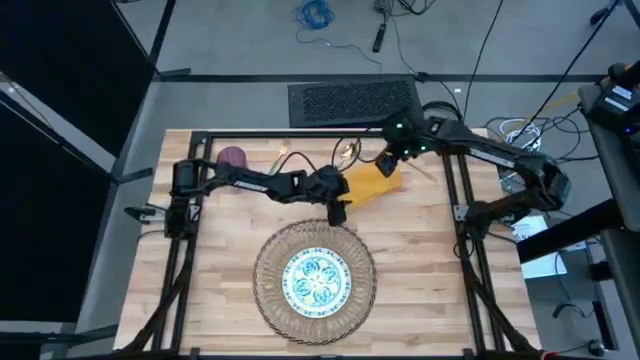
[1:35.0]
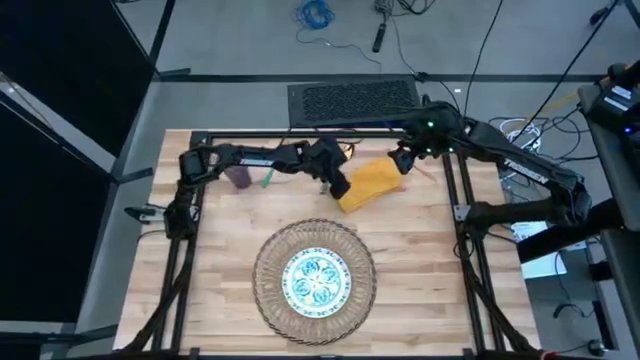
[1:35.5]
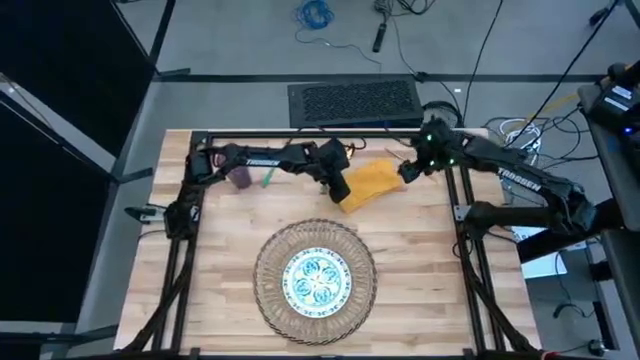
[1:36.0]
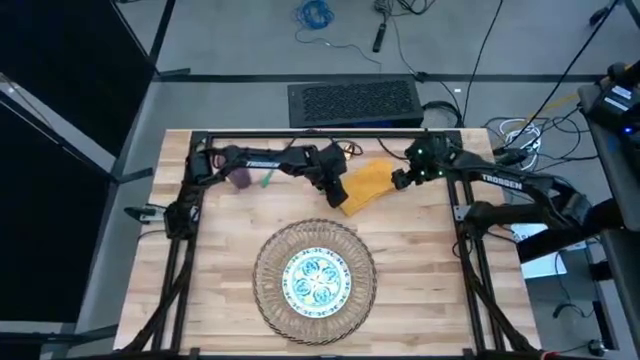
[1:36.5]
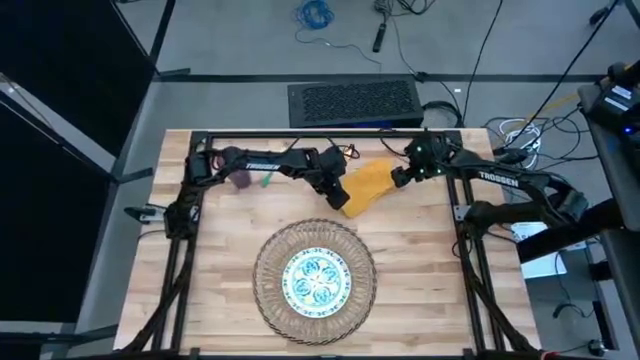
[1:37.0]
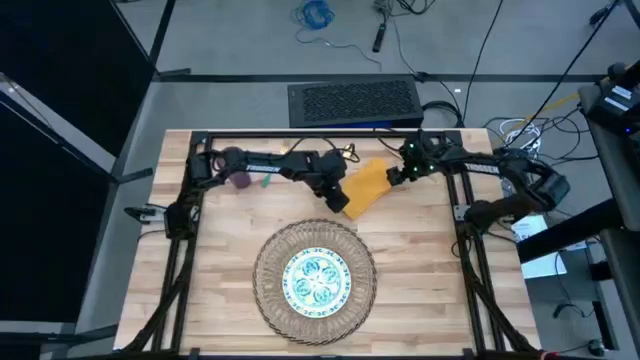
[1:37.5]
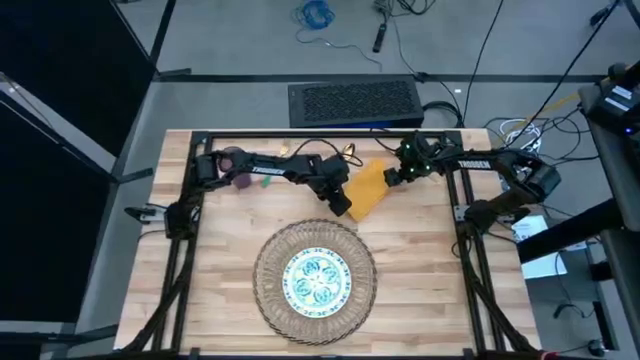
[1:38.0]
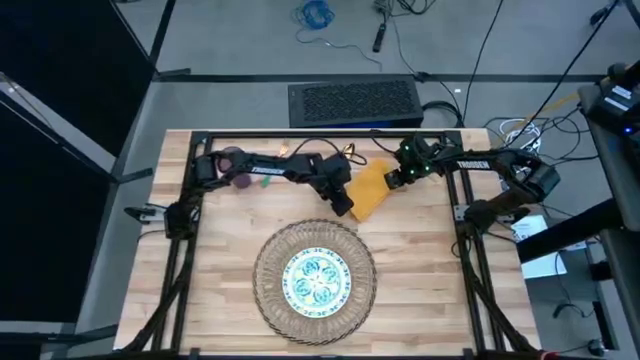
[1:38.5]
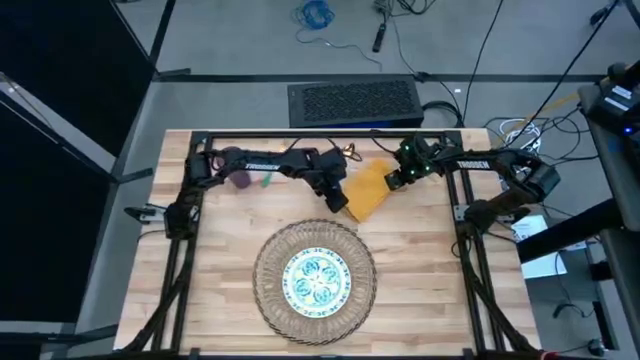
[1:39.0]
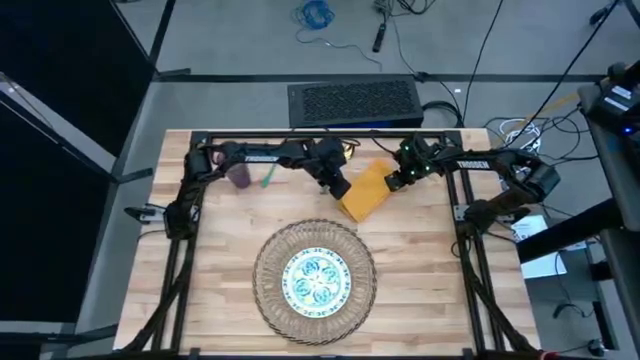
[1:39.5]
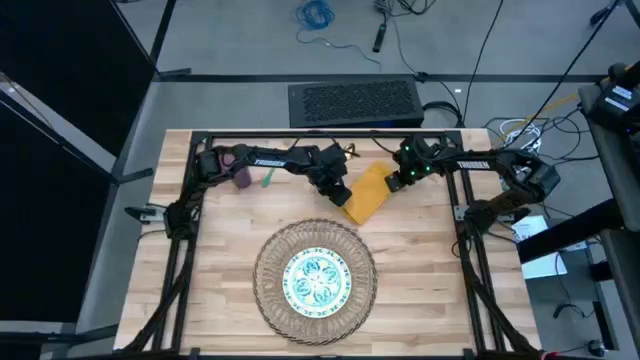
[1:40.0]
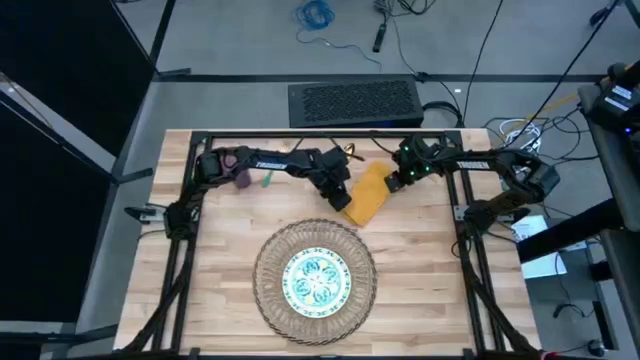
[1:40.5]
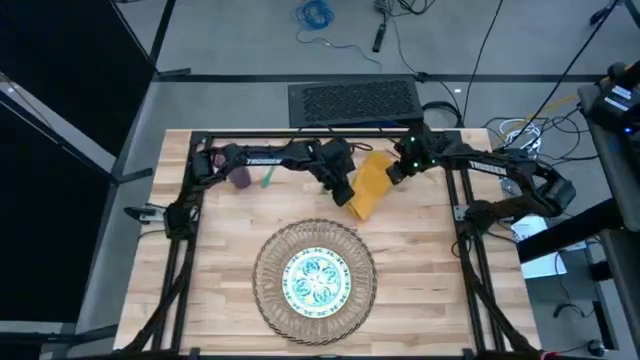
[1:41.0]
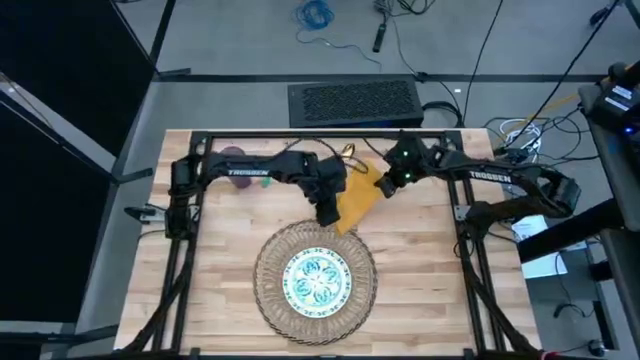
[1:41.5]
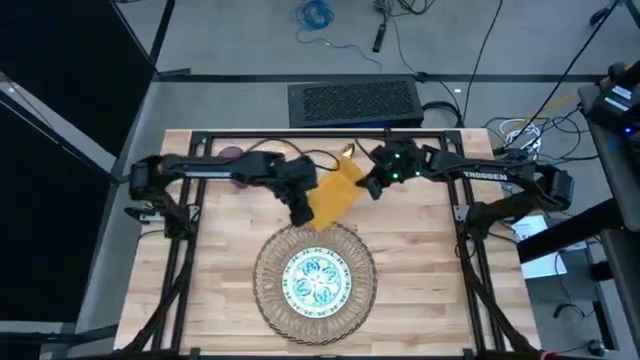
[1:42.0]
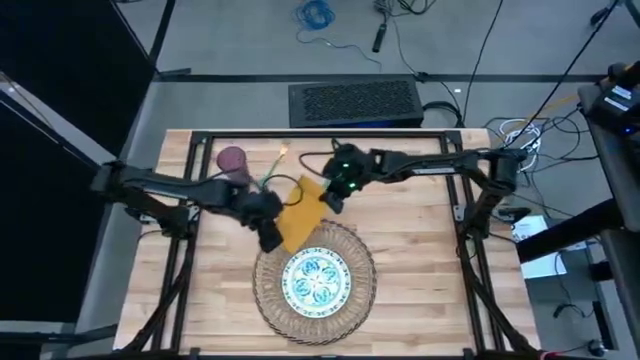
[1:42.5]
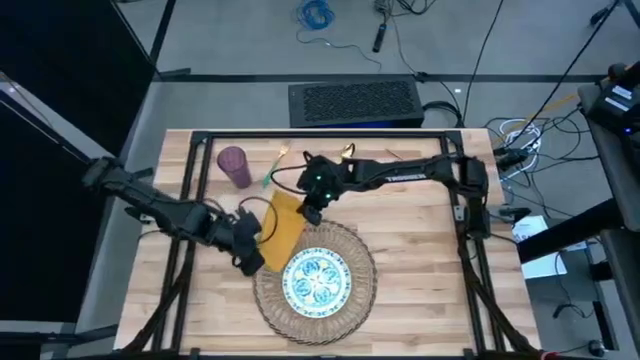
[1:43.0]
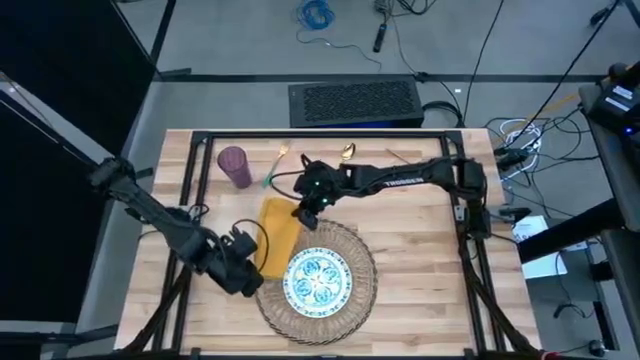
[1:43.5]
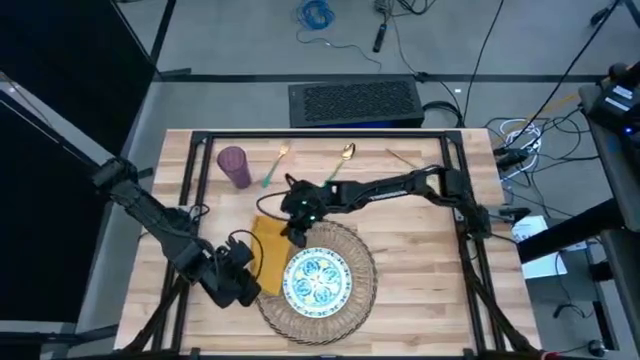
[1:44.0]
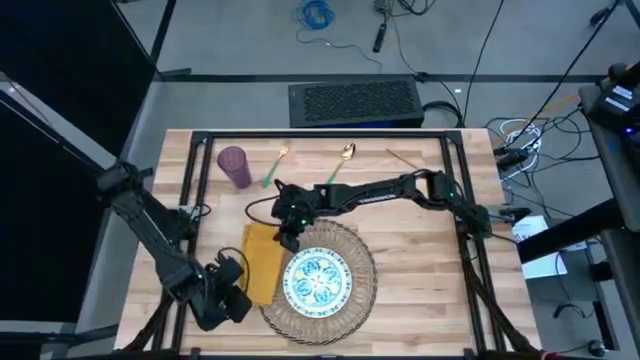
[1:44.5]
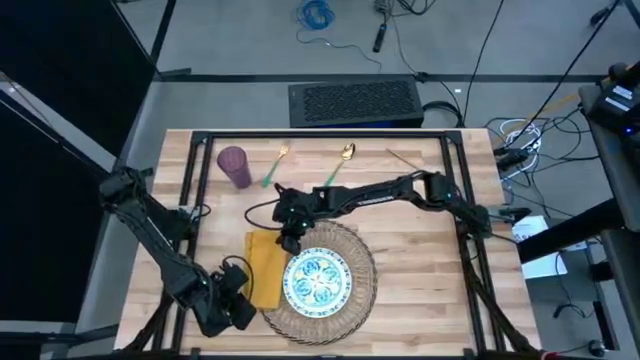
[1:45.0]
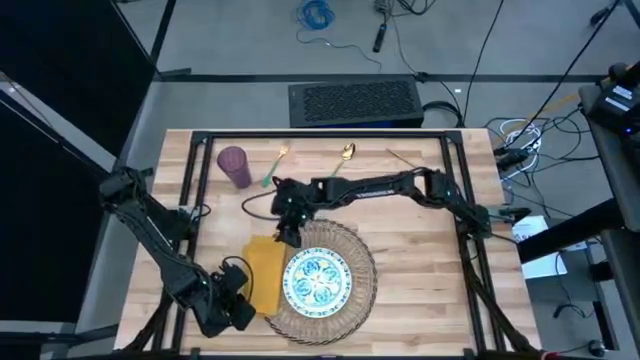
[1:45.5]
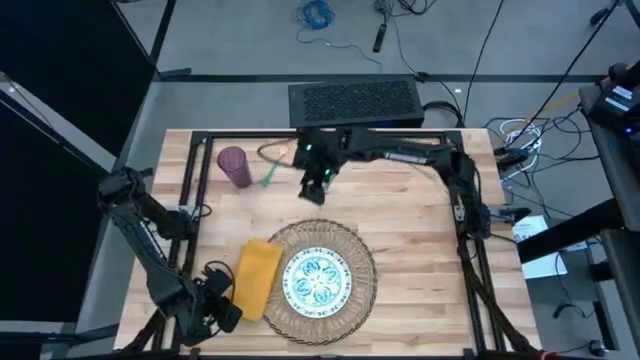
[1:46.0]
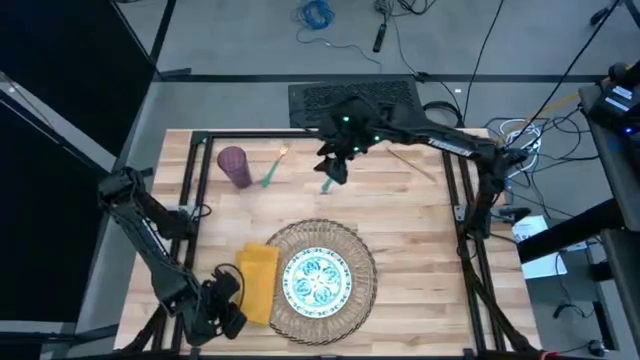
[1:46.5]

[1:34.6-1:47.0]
Task: Set table place
Move the folded yellow table napkin to the left of the white pattern plate on the brown placemat

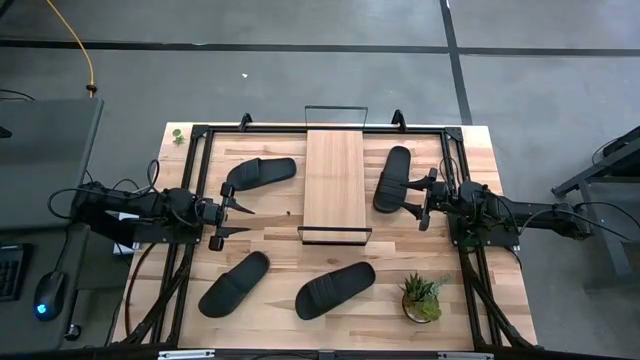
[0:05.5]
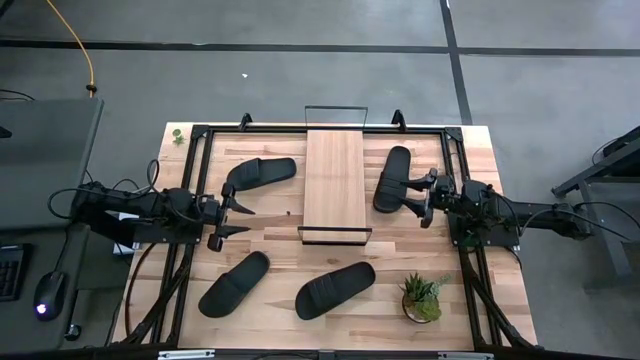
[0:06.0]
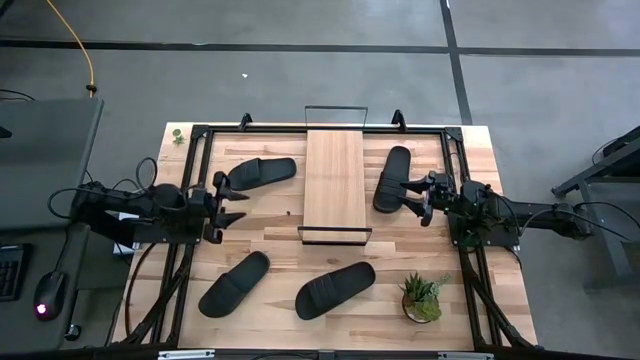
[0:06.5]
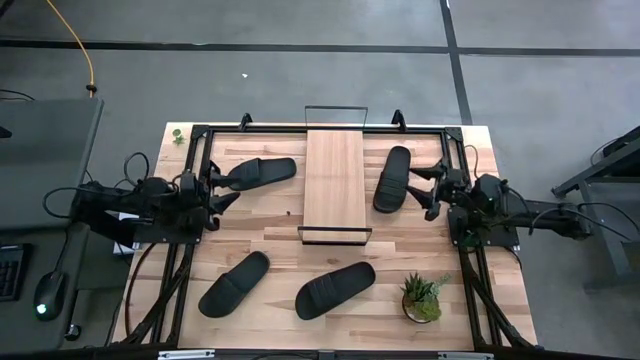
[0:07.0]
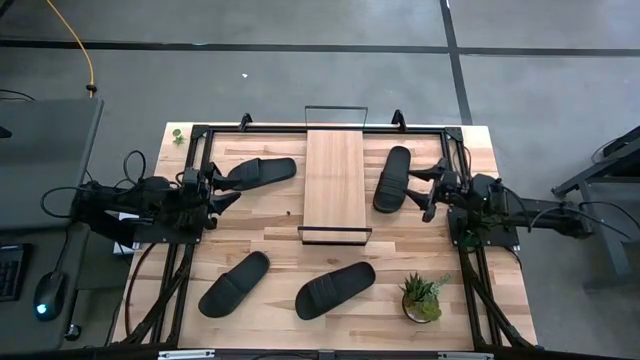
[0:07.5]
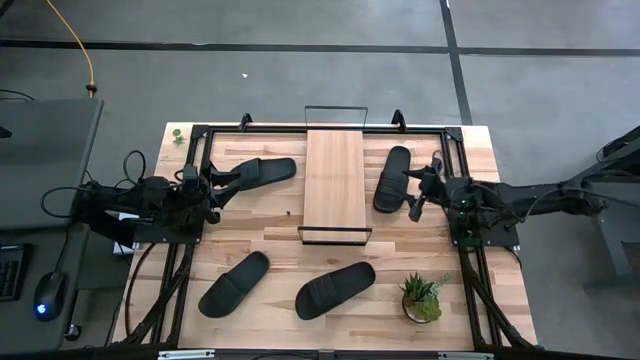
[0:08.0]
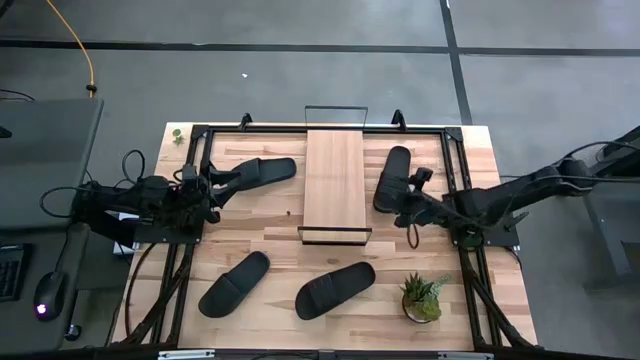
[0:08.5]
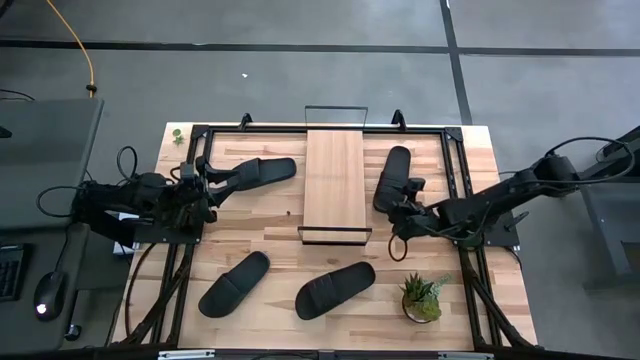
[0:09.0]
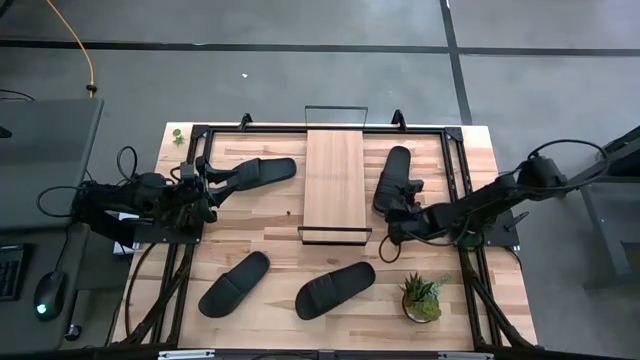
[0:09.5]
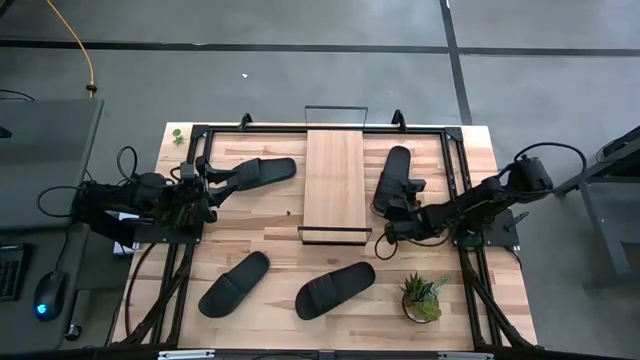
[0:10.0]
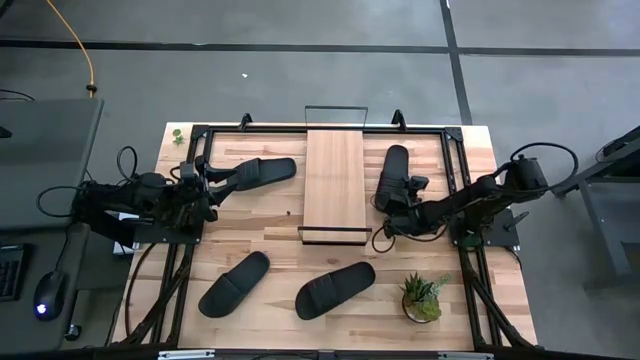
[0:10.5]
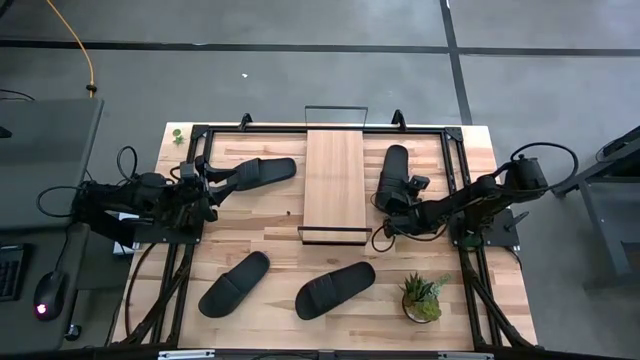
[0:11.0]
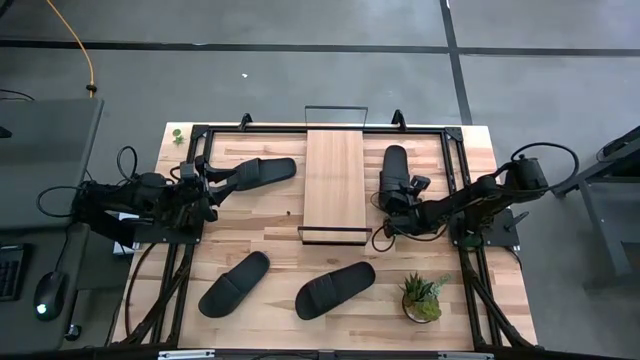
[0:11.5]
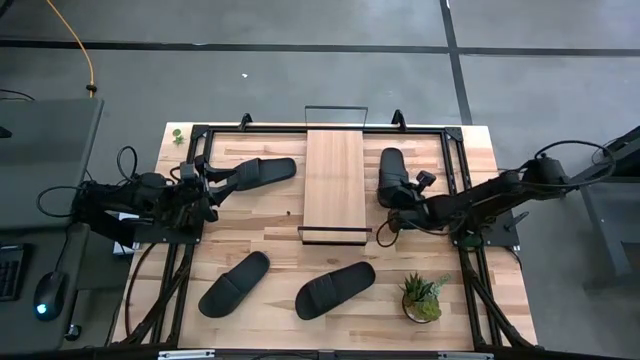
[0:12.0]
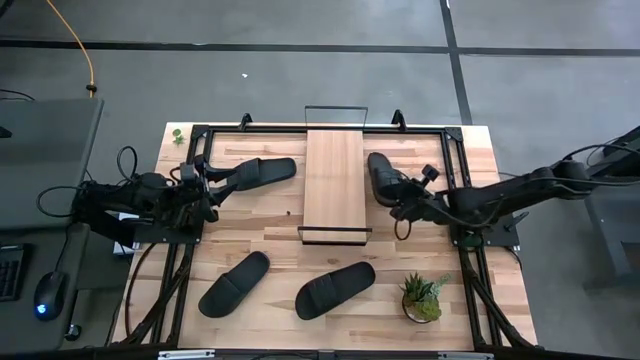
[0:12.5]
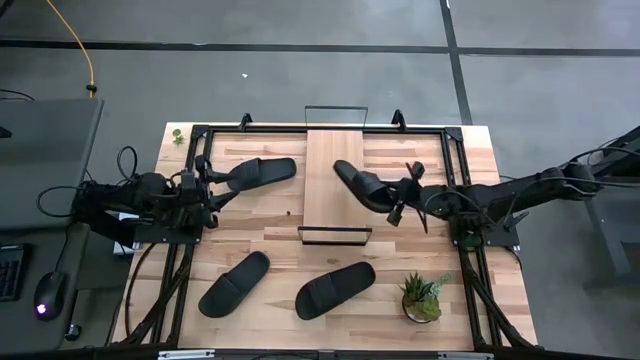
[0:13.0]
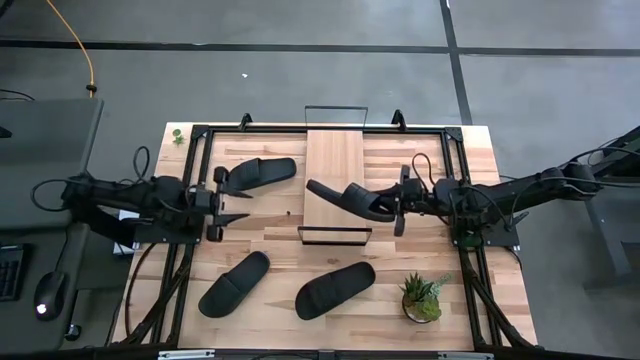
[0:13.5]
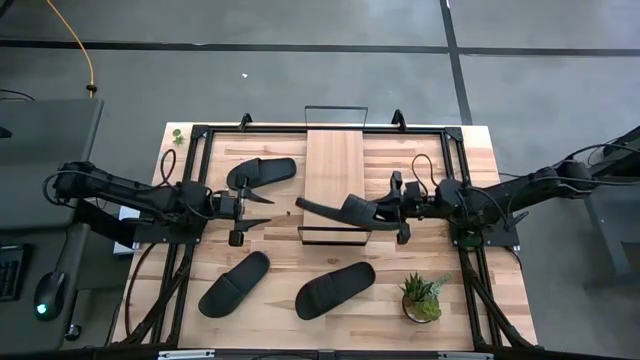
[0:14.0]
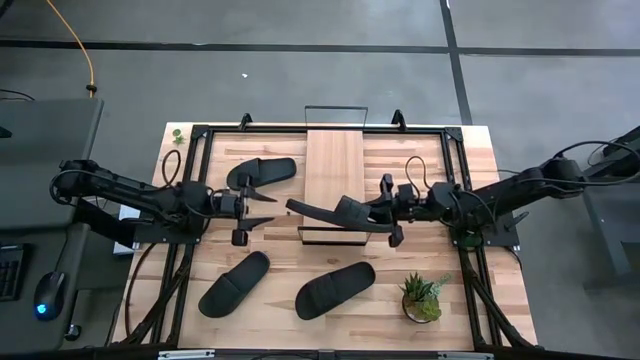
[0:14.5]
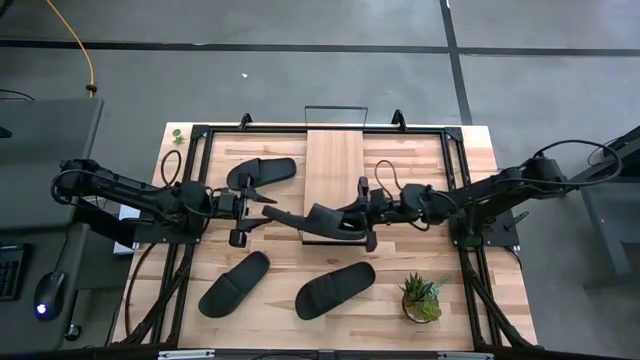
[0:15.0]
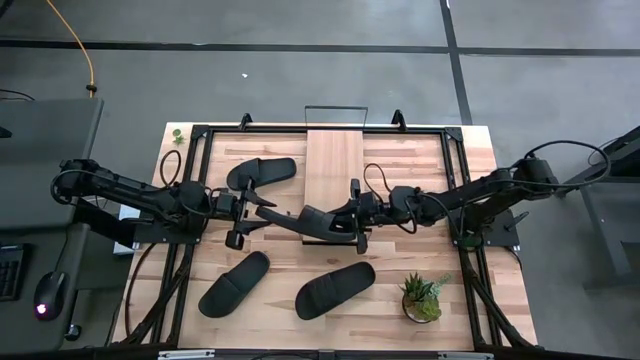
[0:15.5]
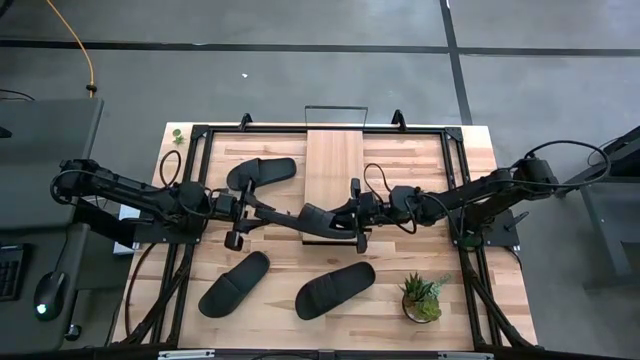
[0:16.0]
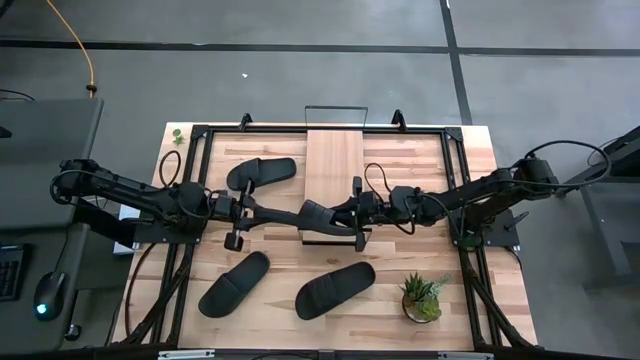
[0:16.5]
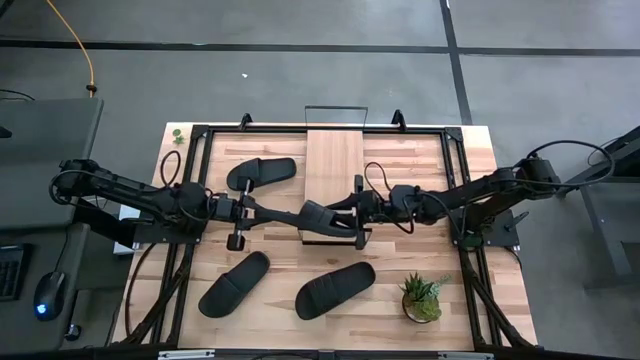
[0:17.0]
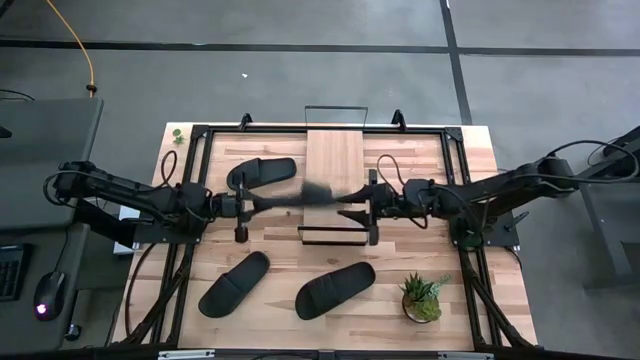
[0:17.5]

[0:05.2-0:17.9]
Task: Pick and place slides into the shelf
Put the black slide on the shelf
